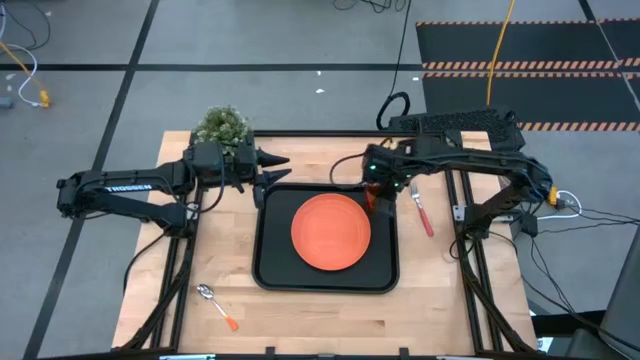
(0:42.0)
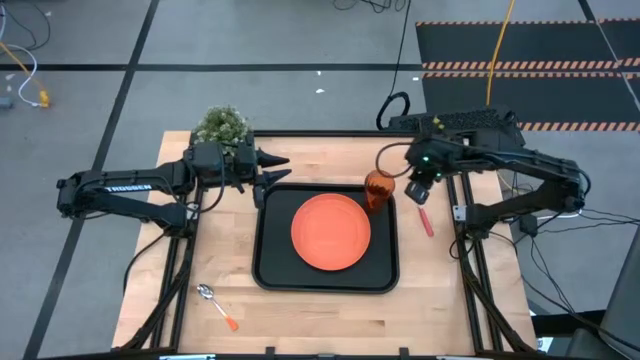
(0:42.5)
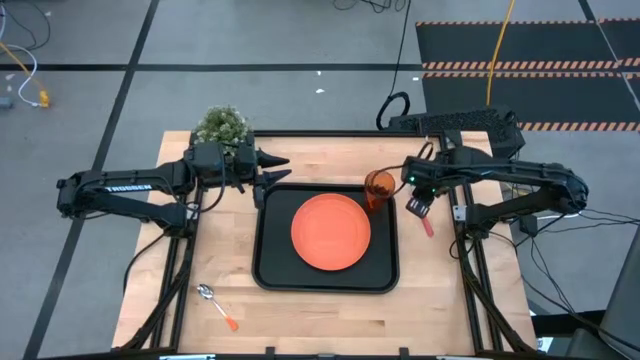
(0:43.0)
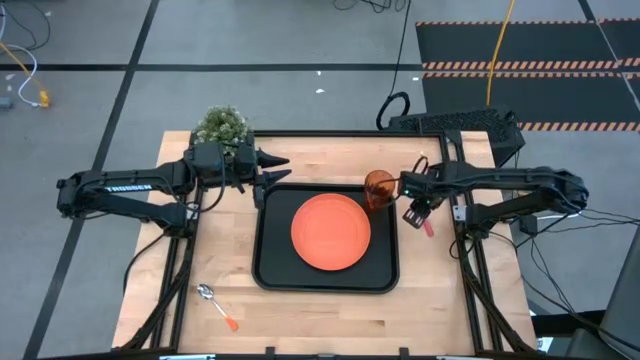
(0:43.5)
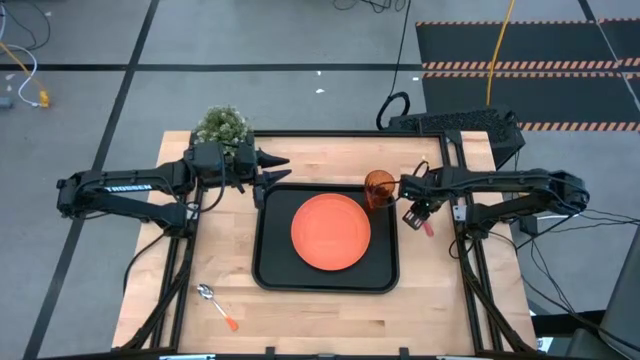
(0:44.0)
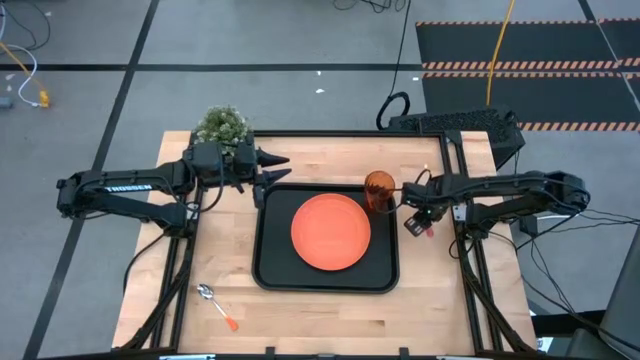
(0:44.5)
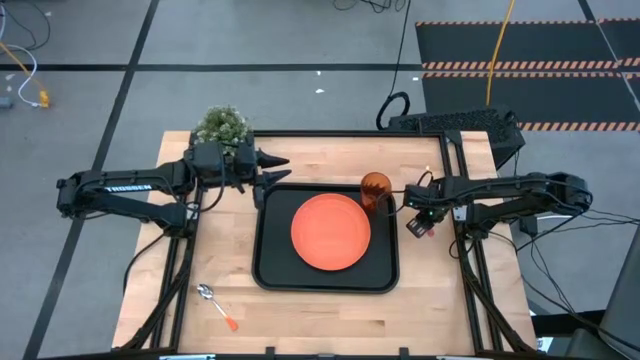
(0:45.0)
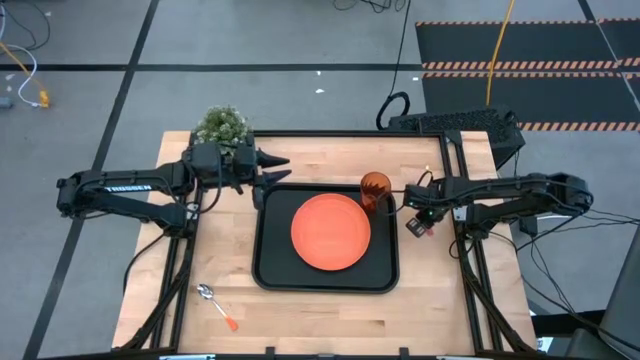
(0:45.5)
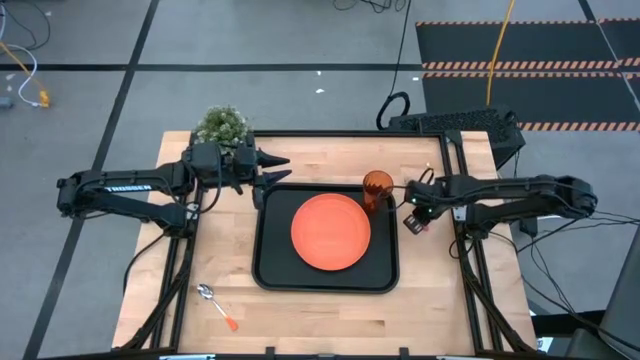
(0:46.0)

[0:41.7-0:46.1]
Task: Pick and place plate/cup/fork/spoon on tray
Put the pink fork on the black tray to the left of the orange plate

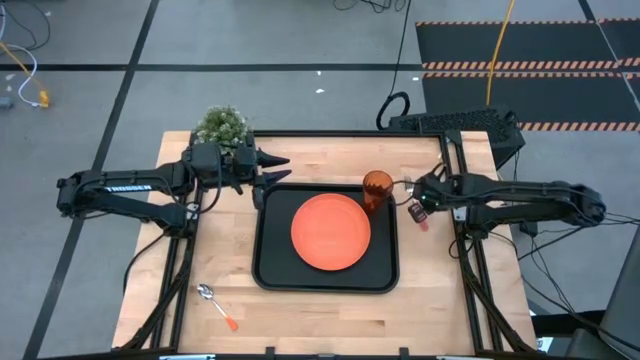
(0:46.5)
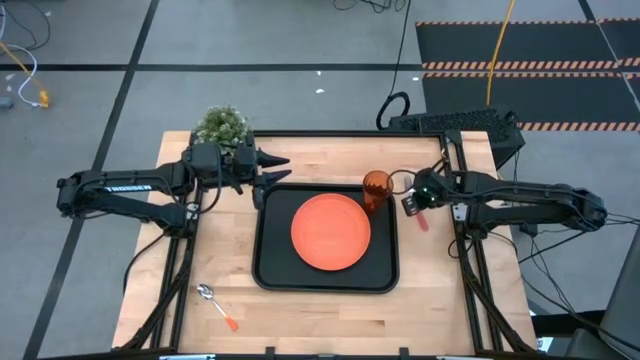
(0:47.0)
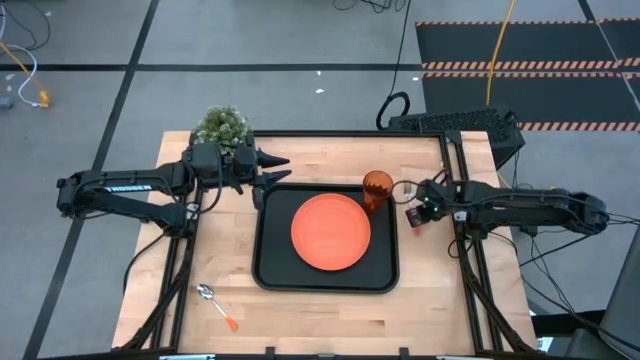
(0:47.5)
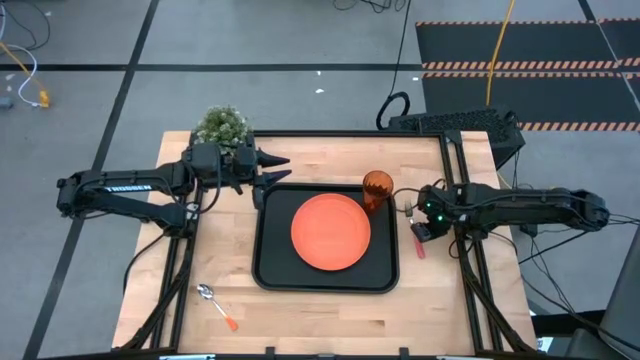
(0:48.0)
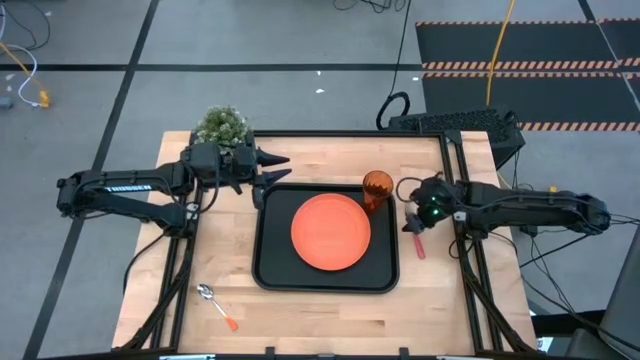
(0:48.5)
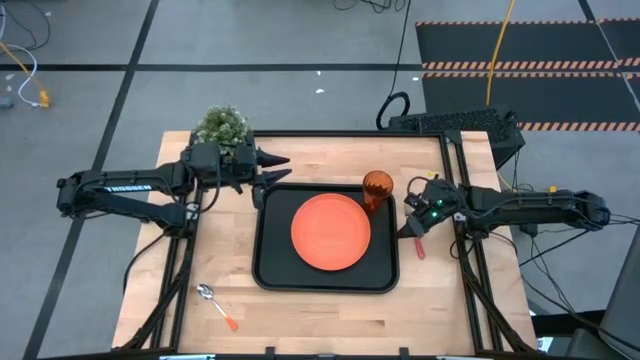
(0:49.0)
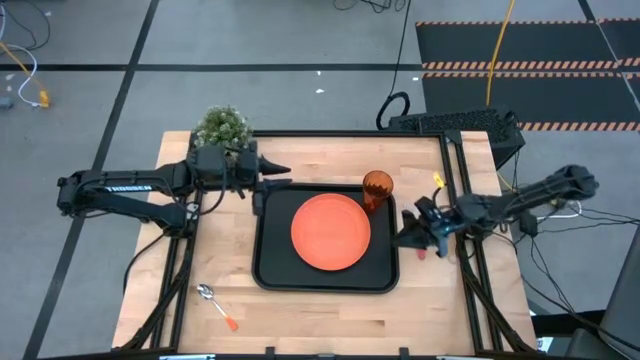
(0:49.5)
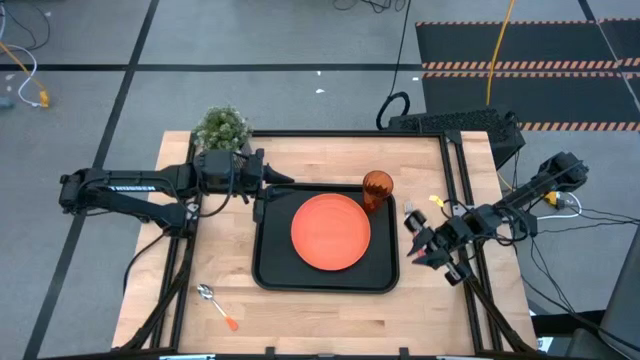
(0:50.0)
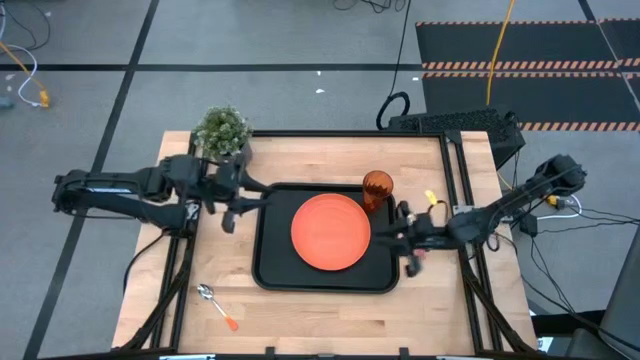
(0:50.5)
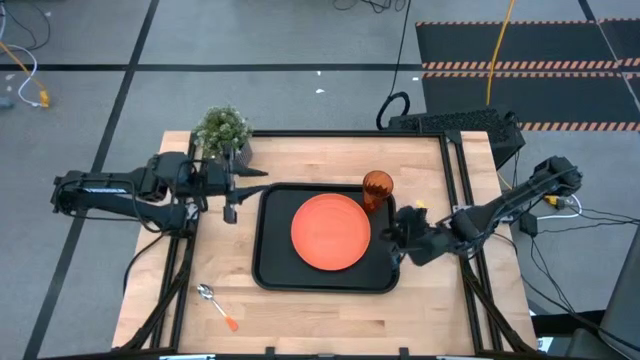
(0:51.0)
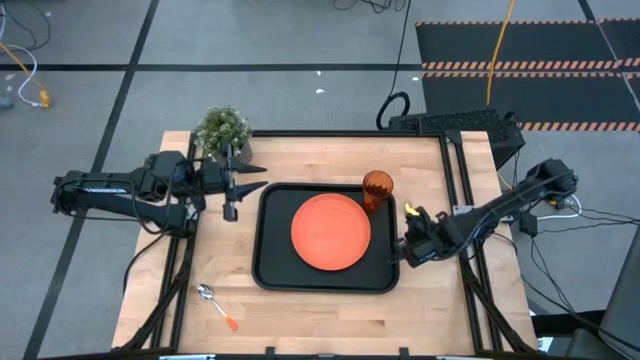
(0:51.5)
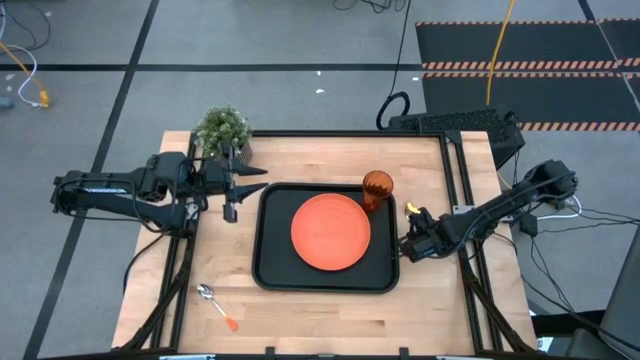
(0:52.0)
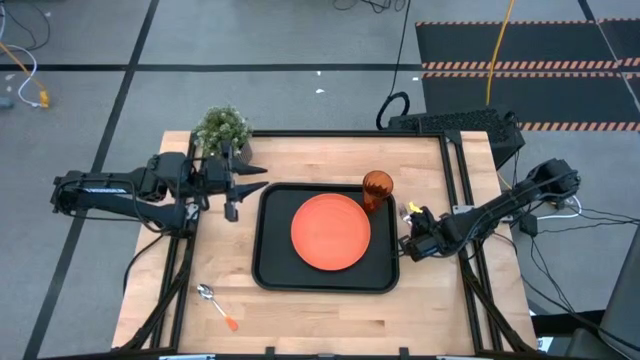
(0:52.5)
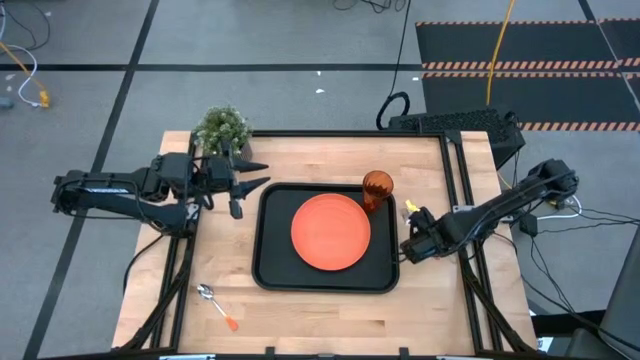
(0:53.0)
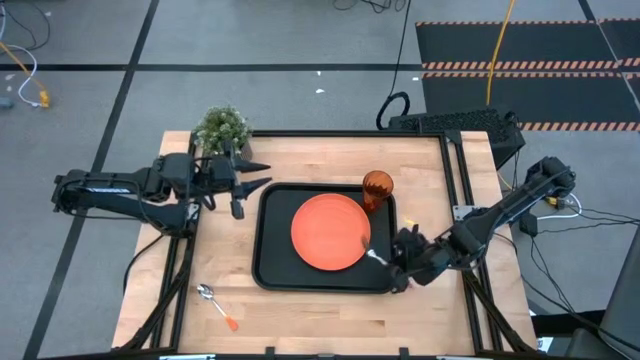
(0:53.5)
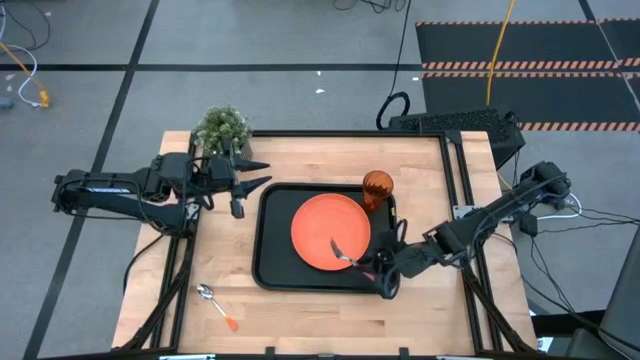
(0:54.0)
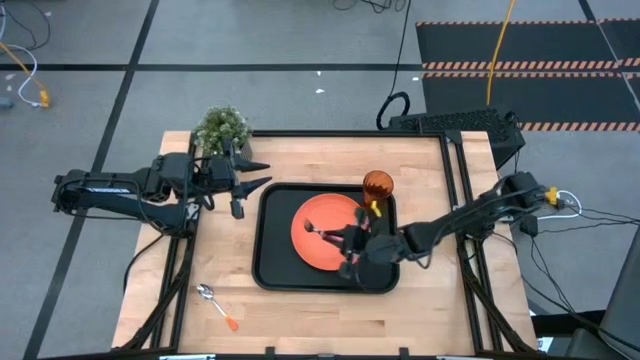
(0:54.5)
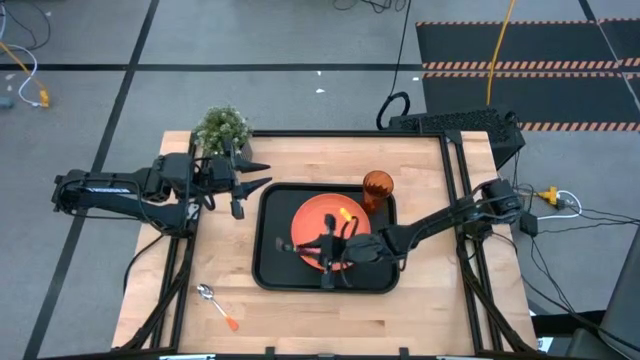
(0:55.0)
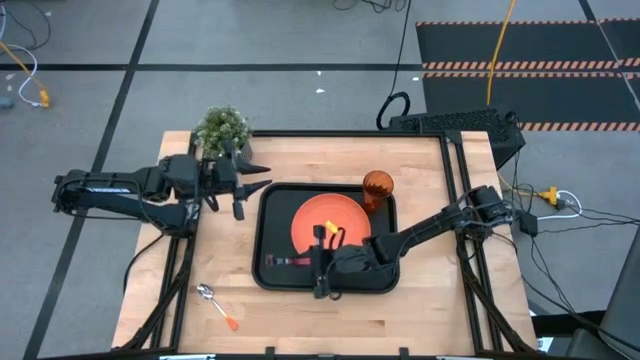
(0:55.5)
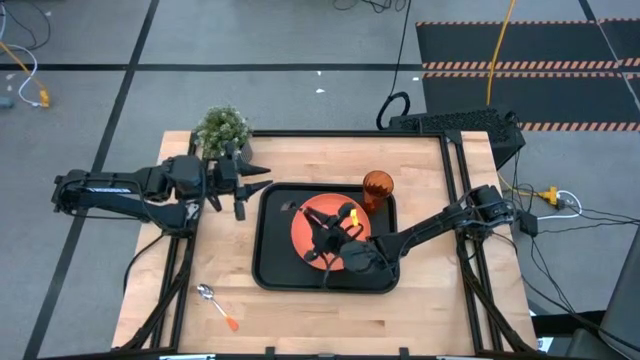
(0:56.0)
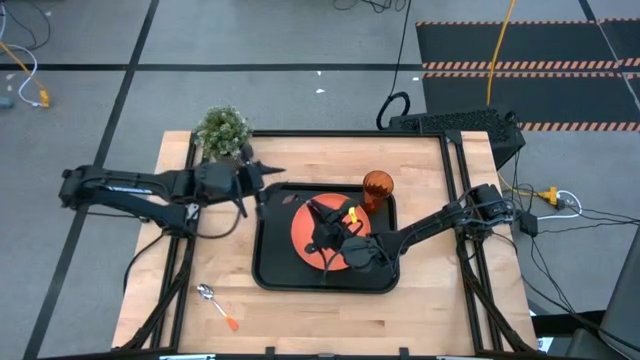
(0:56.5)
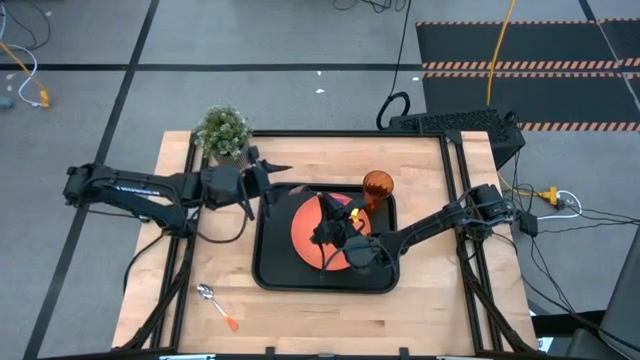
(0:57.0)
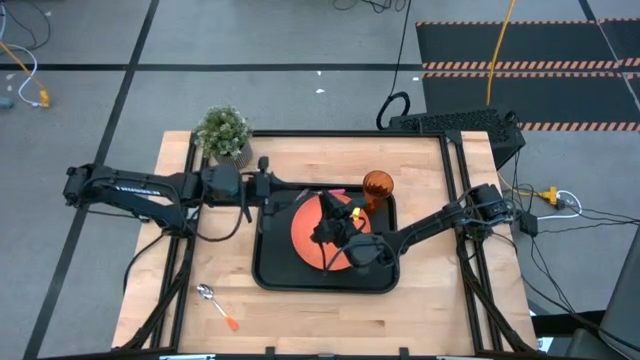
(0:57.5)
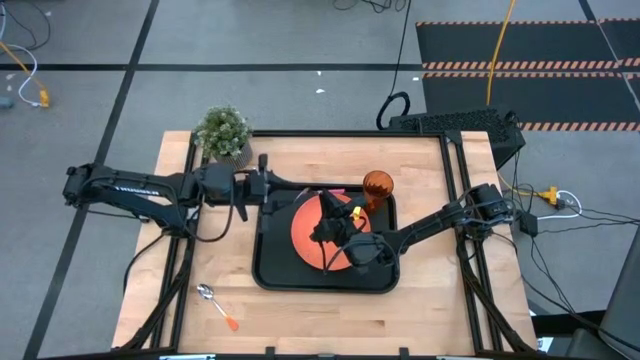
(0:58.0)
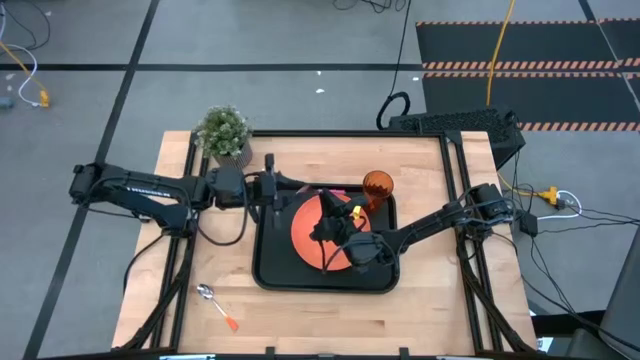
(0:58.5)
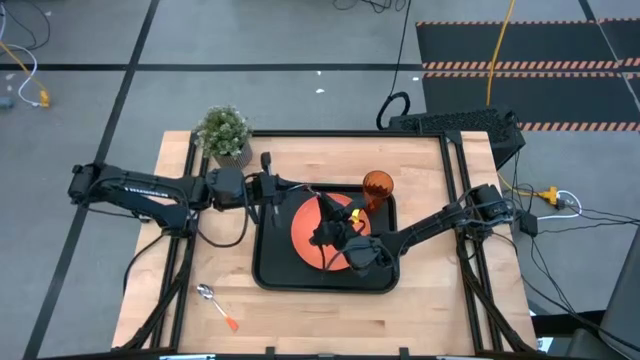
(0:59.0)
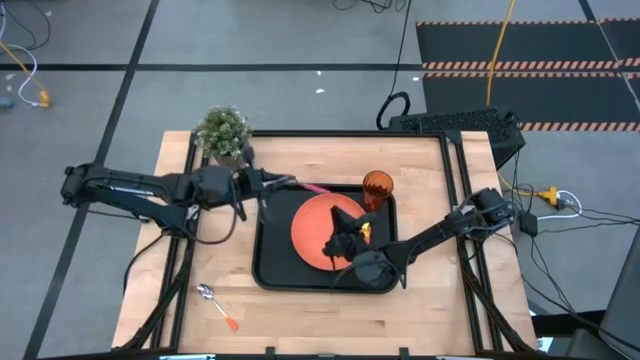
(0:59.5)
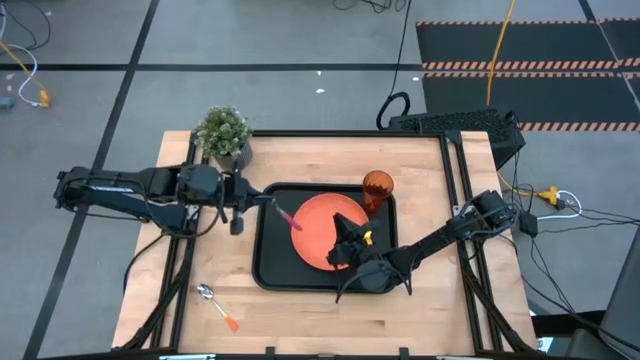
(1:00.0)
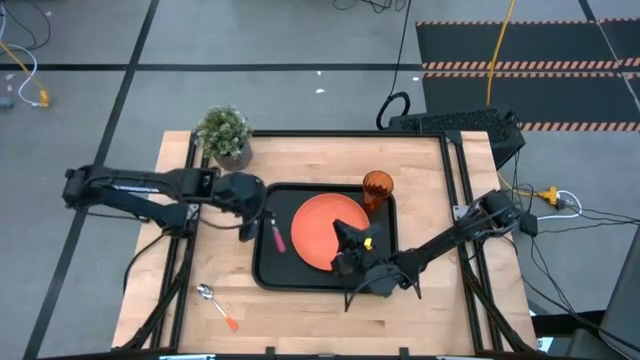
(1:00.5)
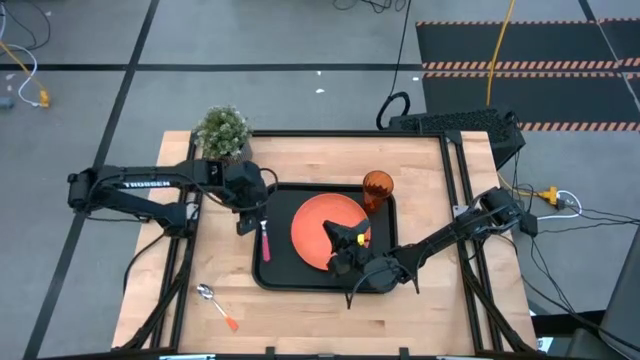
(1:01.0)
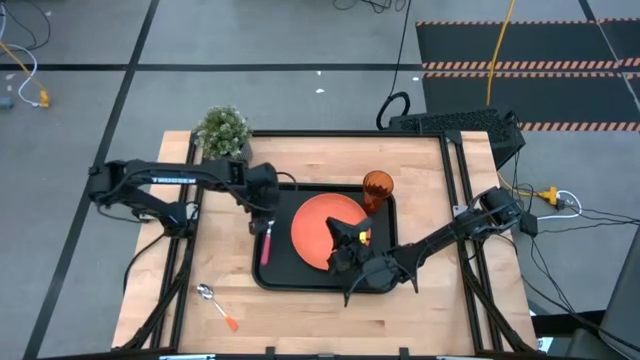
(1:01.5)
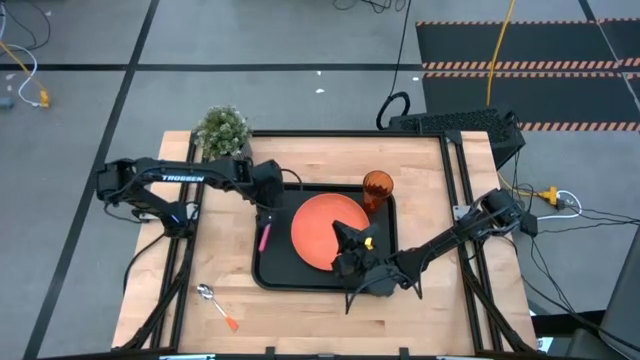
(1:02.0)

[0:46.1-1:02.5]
Put the pink fork on the black tray to the left of the orange plate

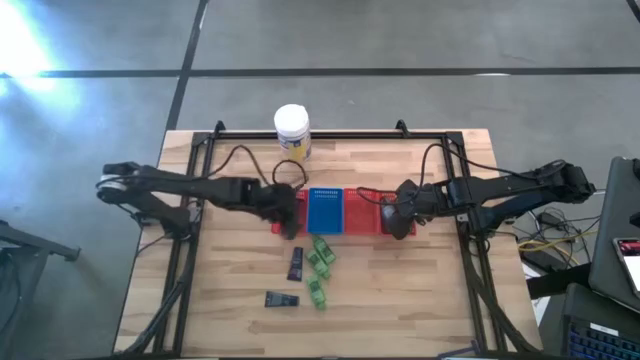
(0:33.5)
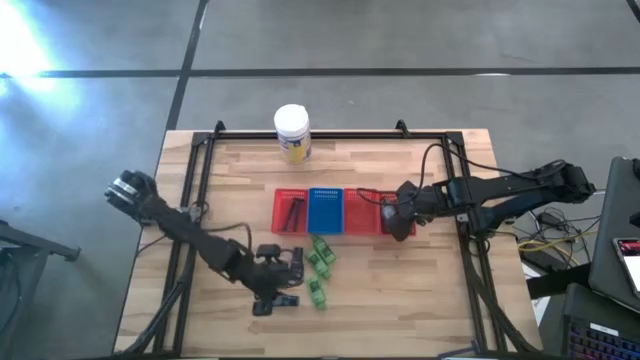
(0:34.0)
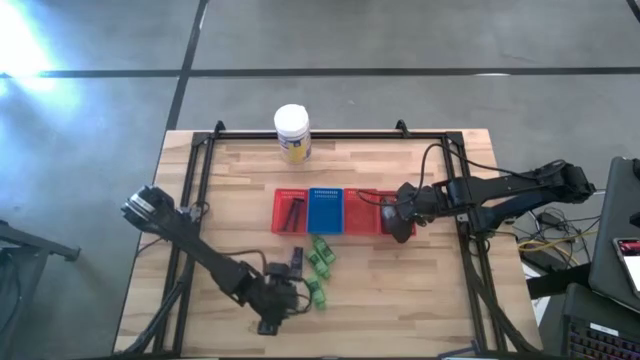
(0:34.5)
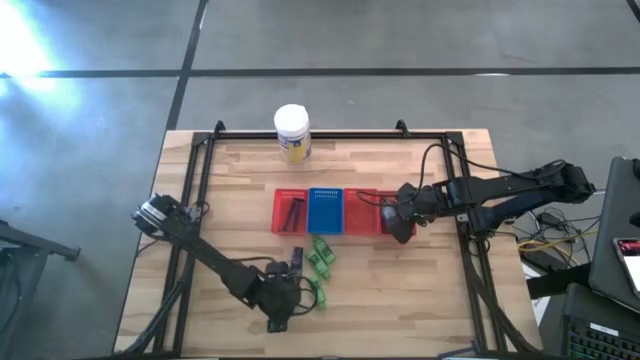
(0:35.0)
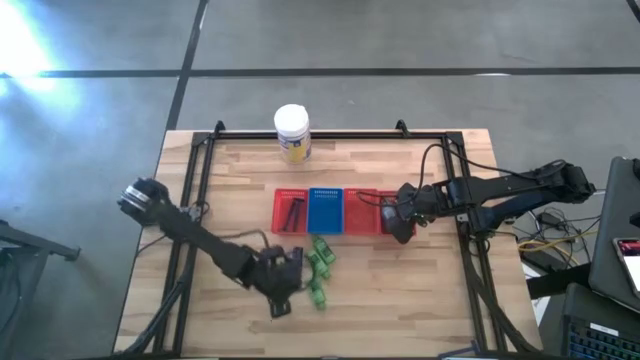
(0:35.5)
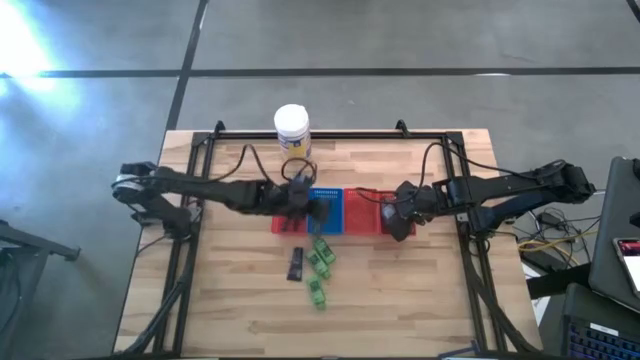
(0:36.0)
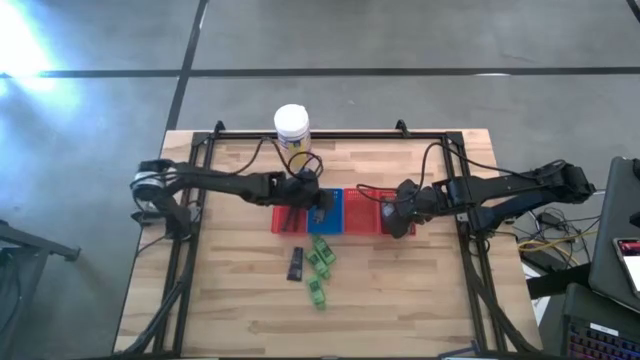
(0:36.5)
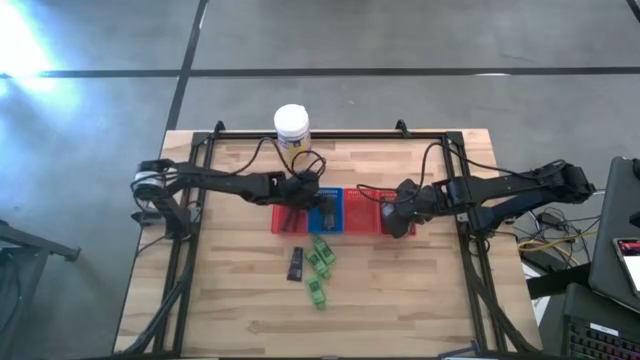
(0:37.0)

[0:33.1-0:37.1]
Task: Pick & Place Travel size toiletries
Put the bottom shave cream into the blue bin
